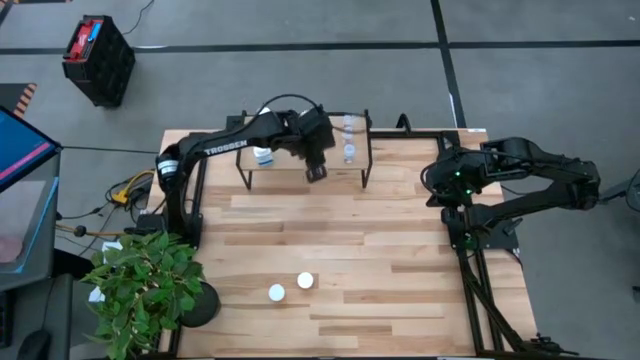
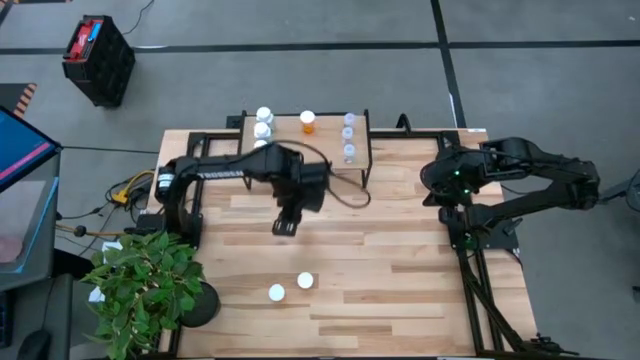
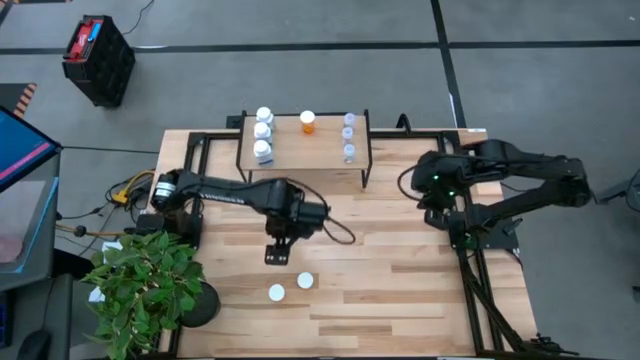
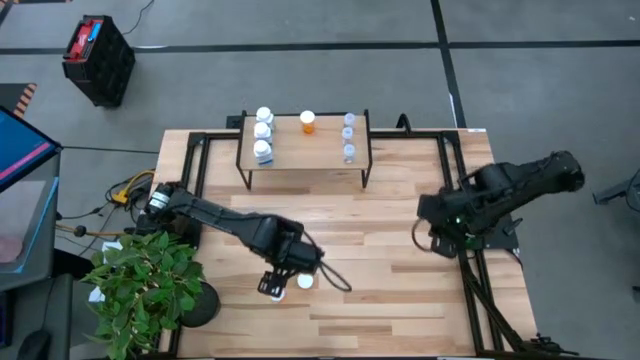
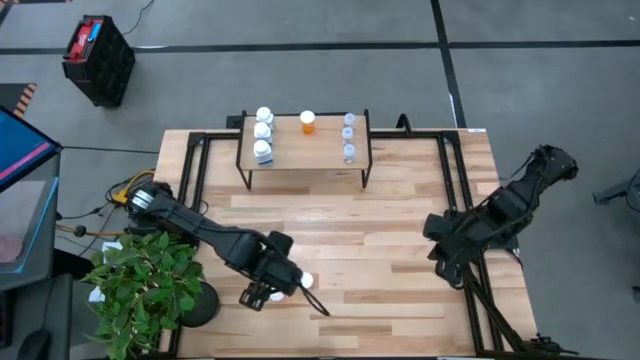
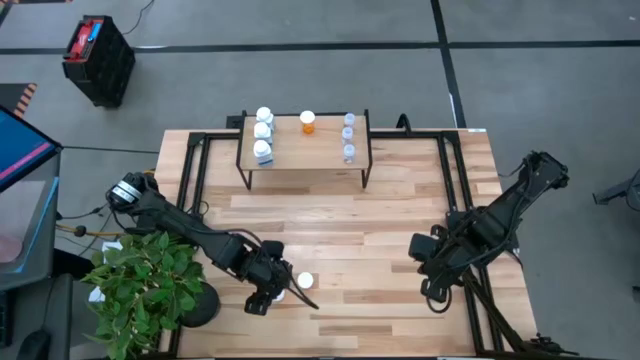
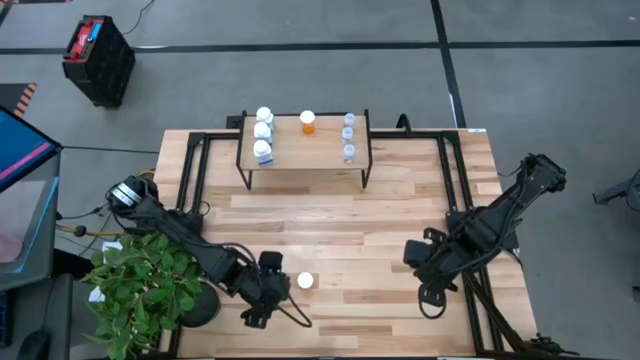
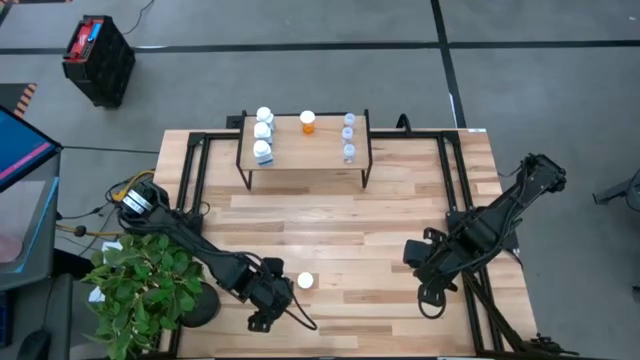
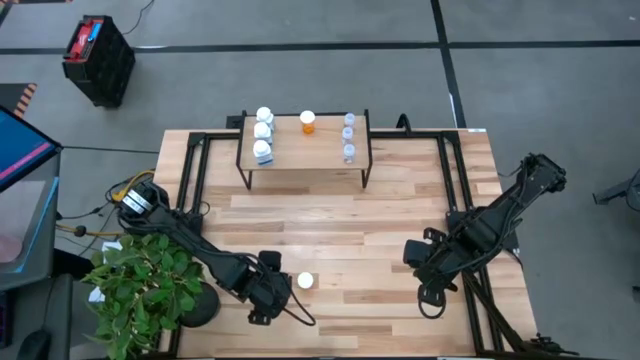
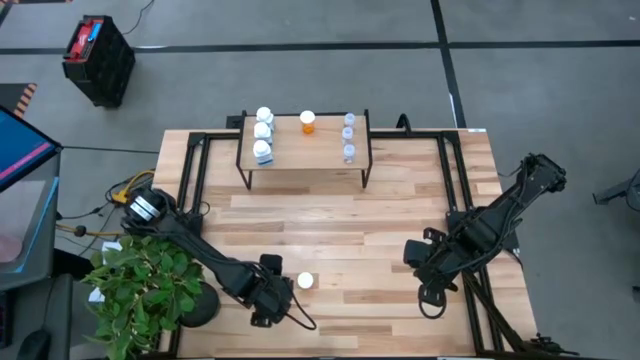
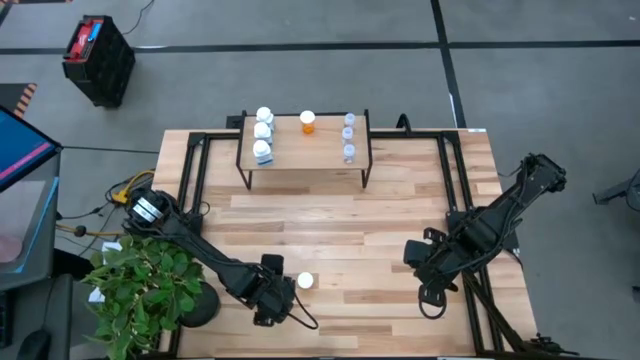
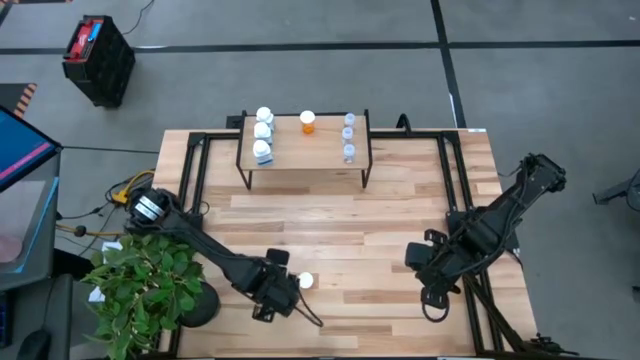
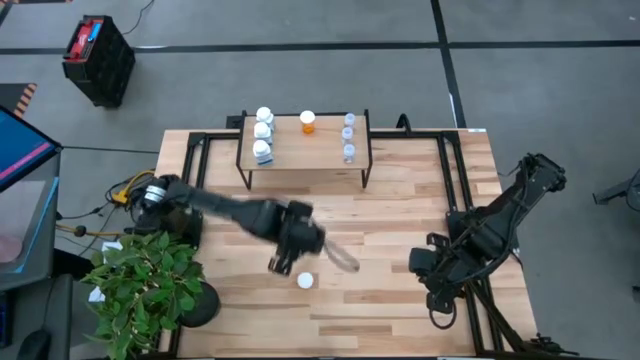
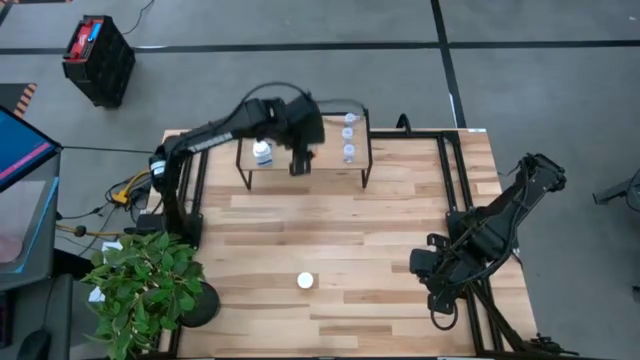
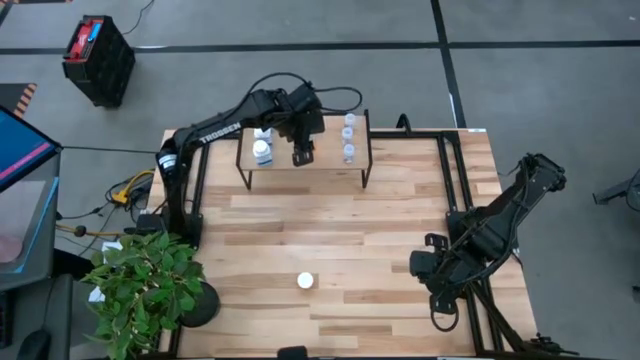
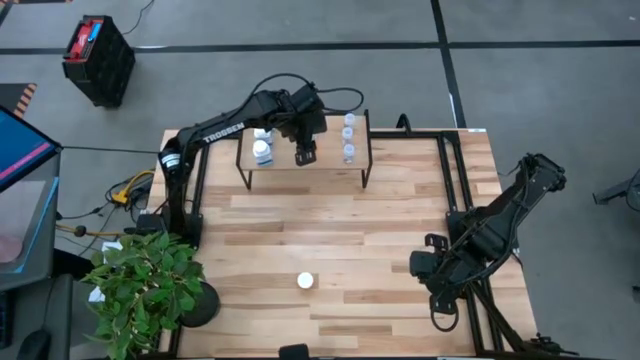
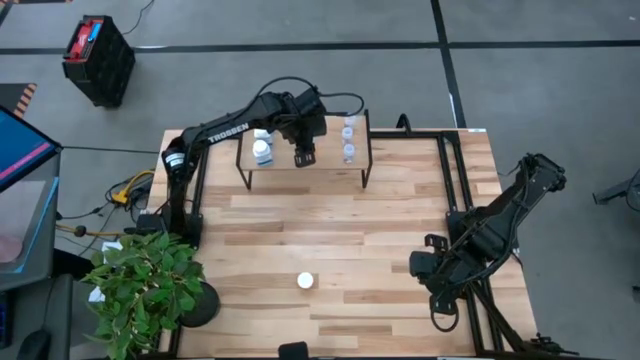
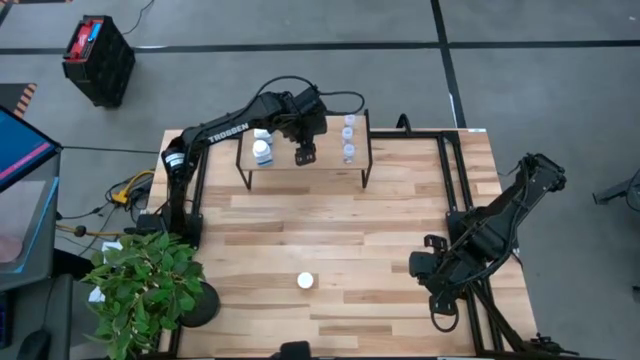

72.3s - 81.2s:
Task: Pick and place medicine bottles onto shelf by color
Put the left orange pill bottle on the shelf aligned with the other orange pill bottle

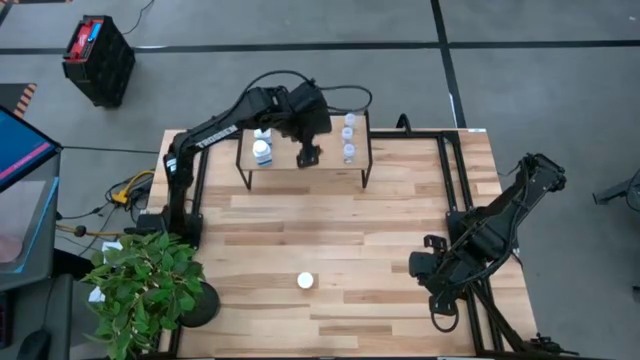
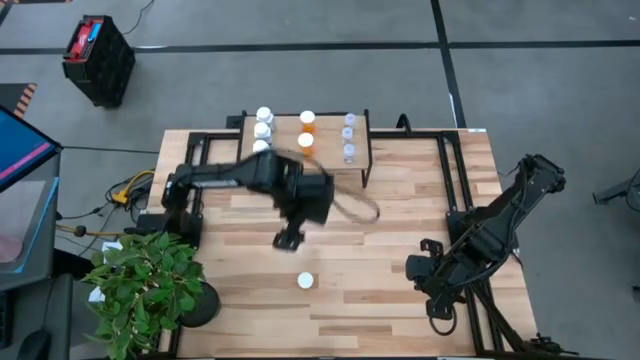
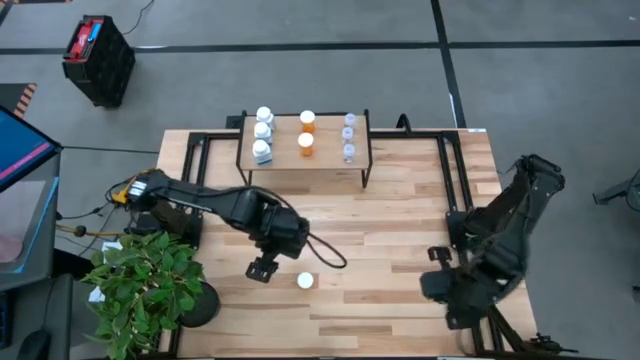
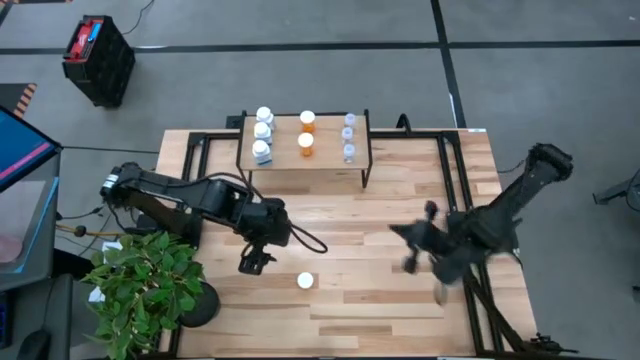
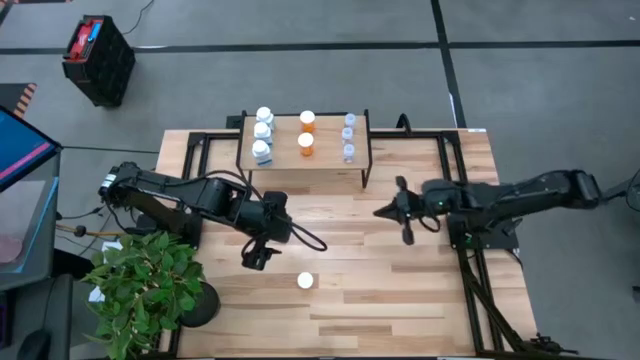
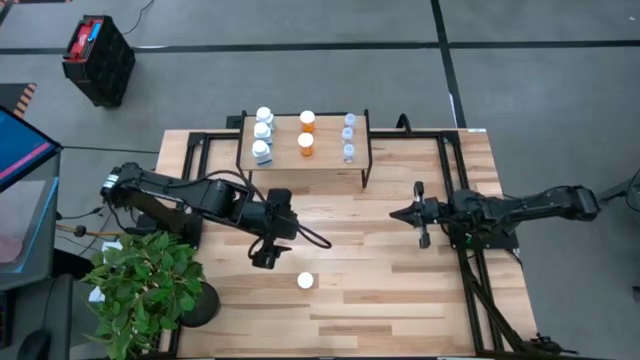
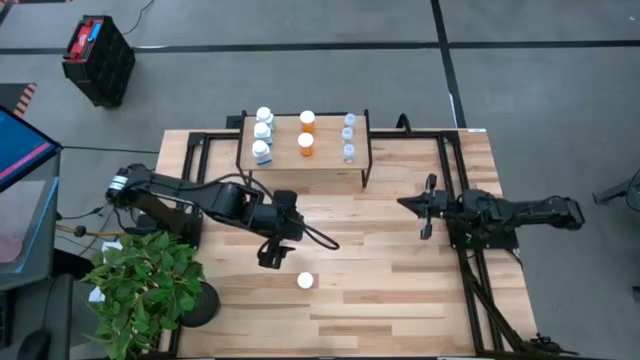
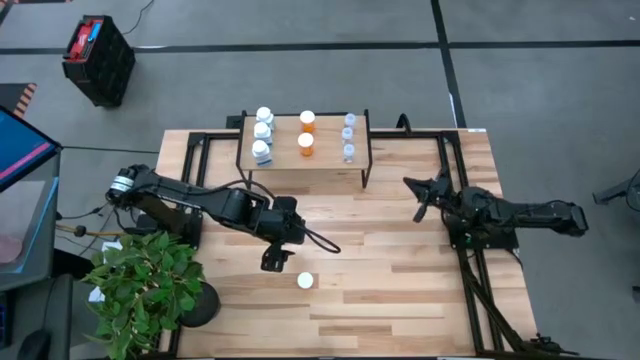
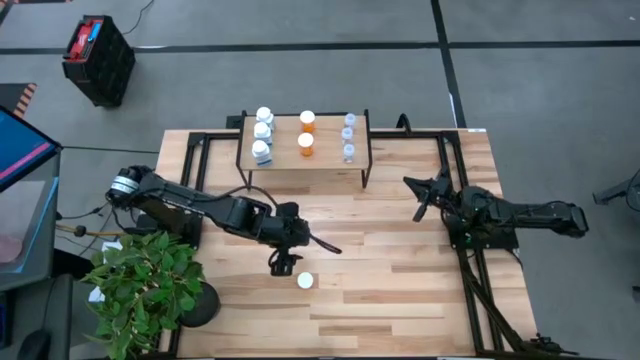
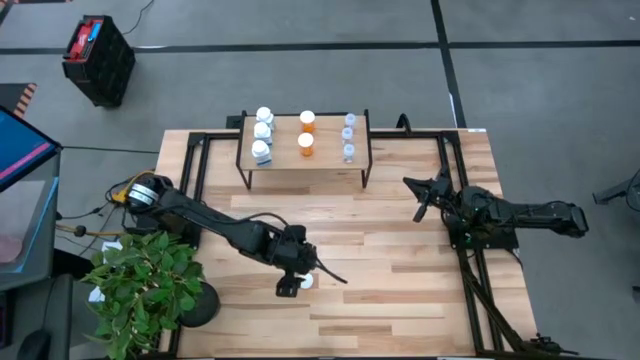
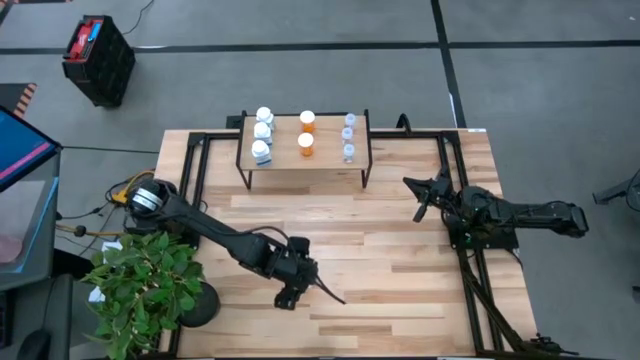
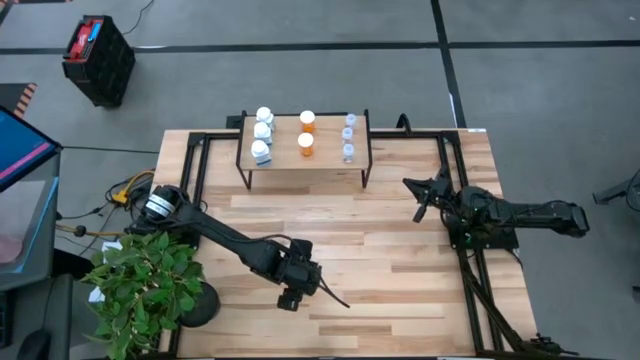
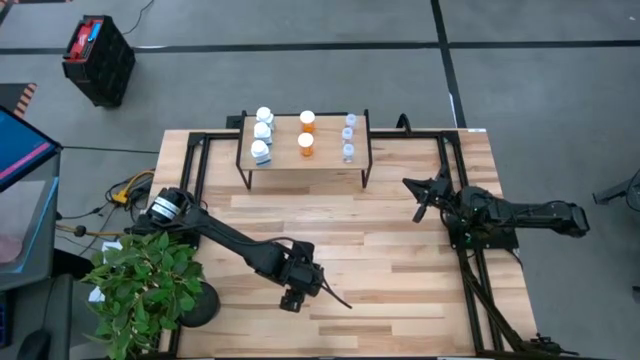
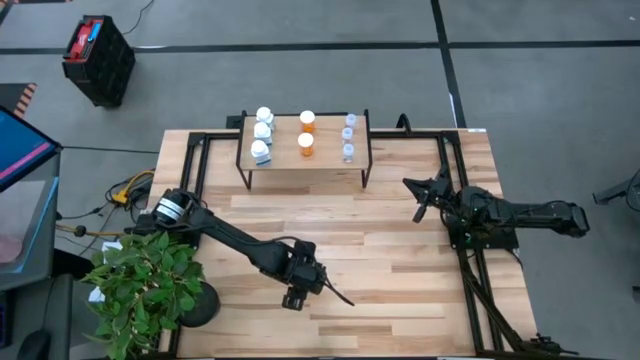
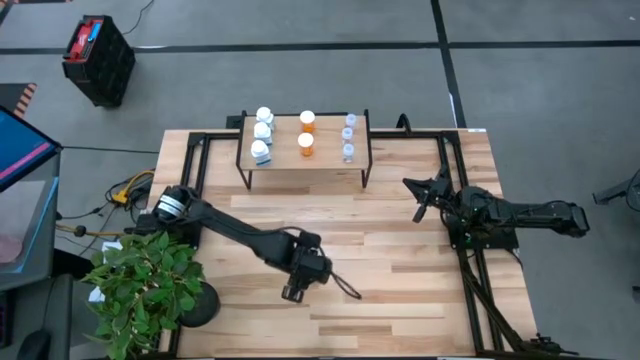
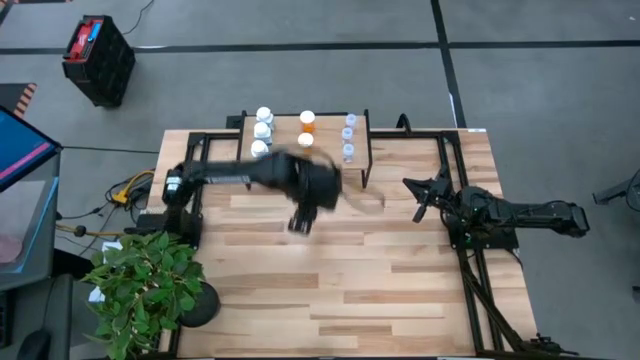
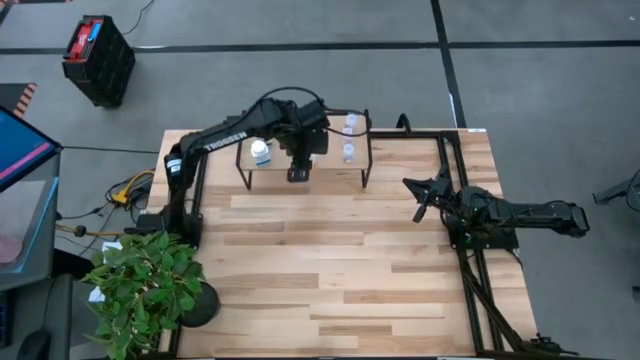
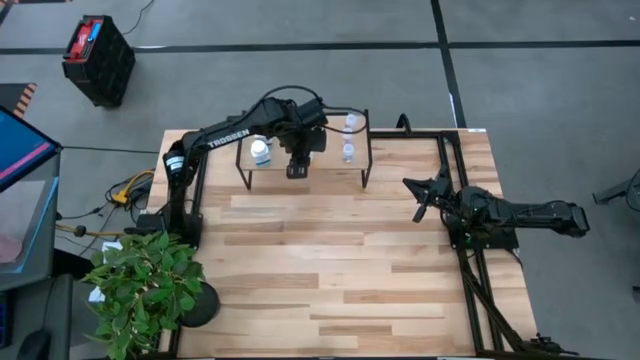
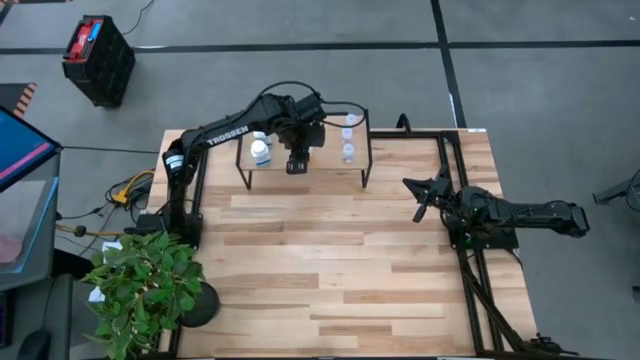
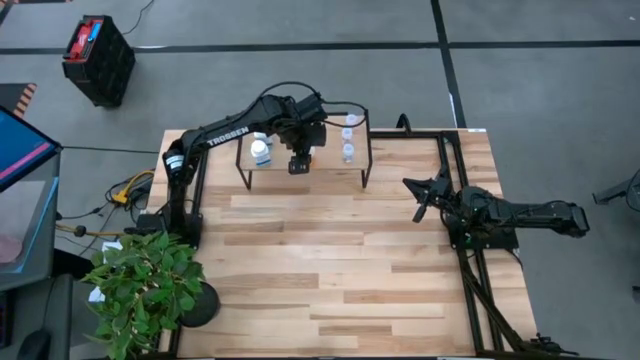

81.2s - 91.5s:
Put the orange pill bottle on the shelf aligned with the other orange pill bottles
